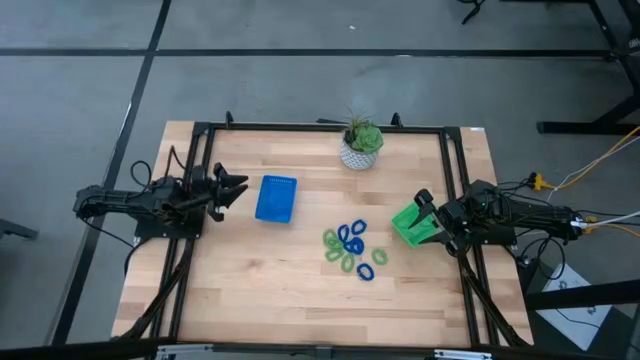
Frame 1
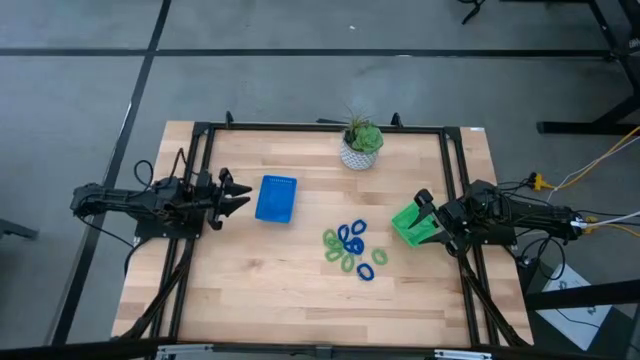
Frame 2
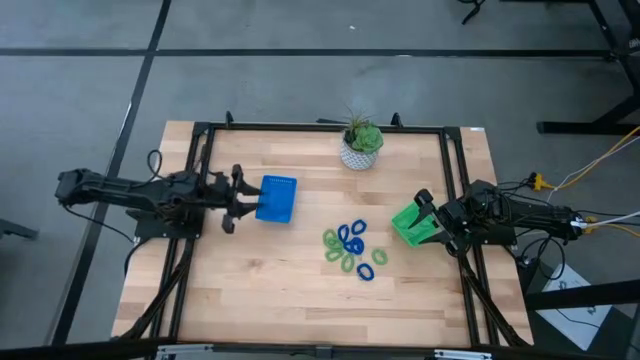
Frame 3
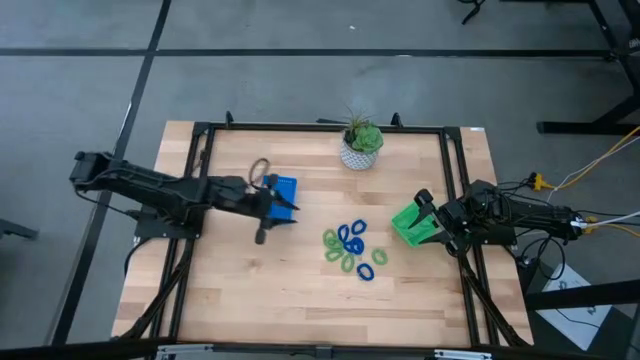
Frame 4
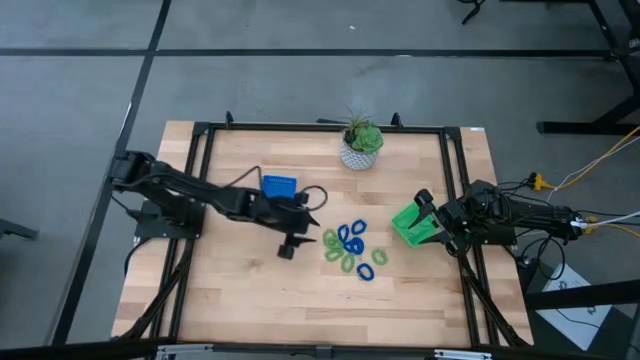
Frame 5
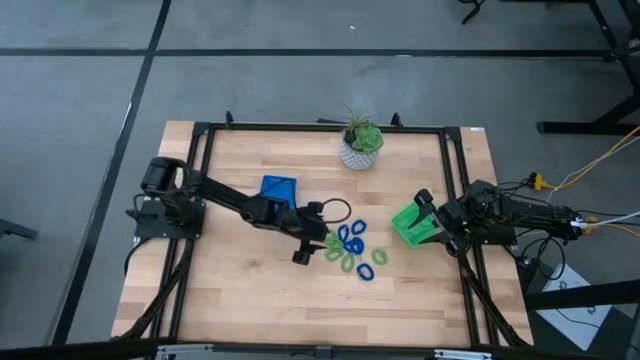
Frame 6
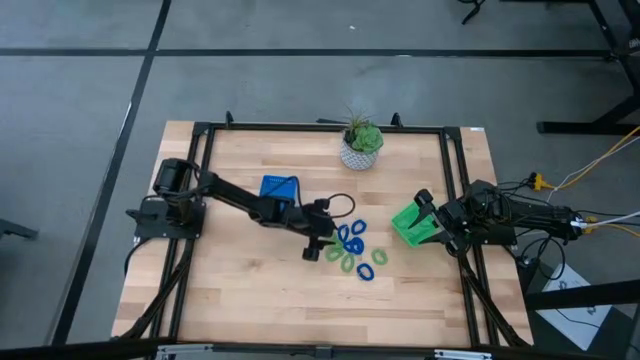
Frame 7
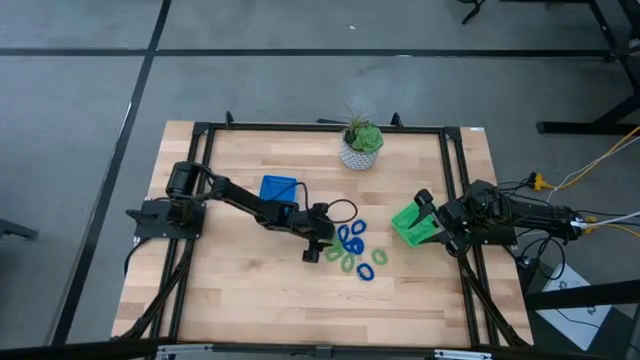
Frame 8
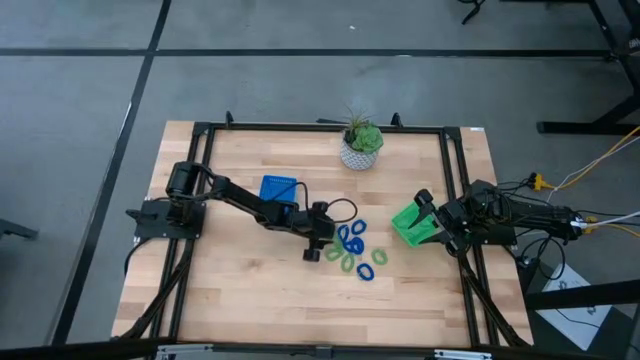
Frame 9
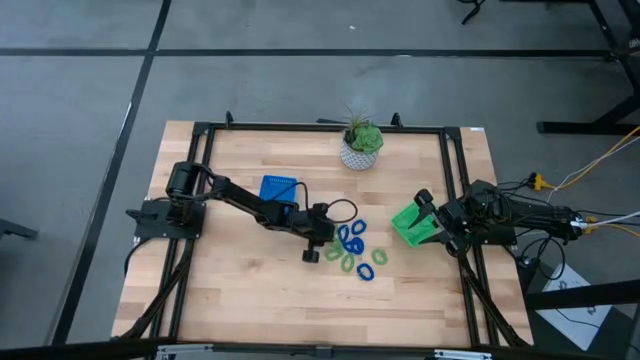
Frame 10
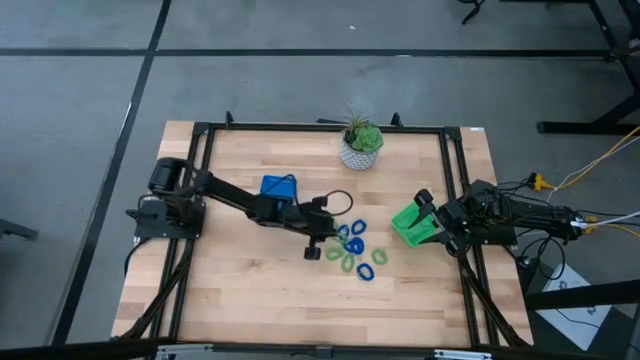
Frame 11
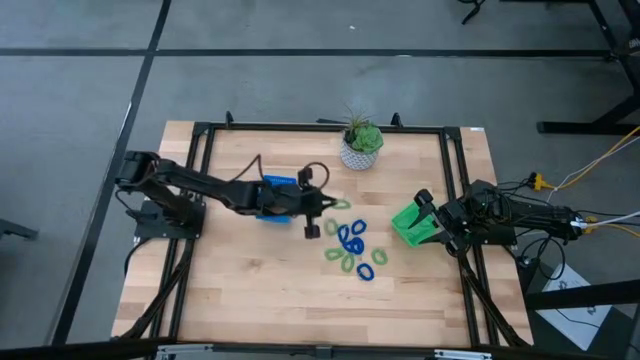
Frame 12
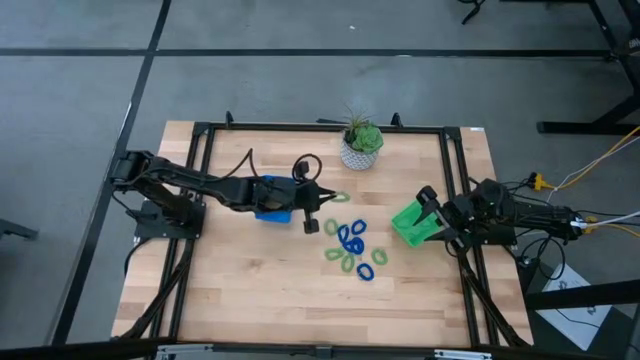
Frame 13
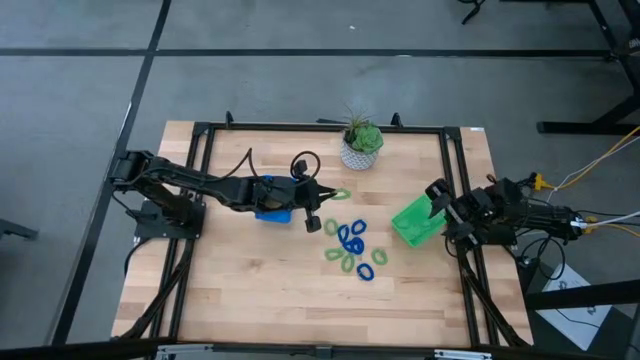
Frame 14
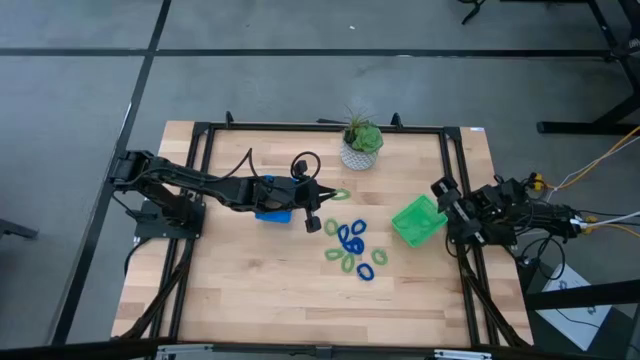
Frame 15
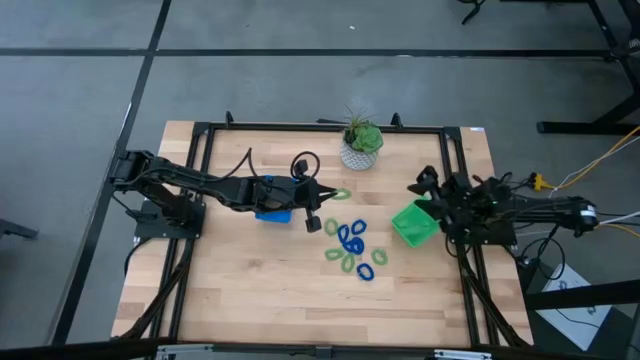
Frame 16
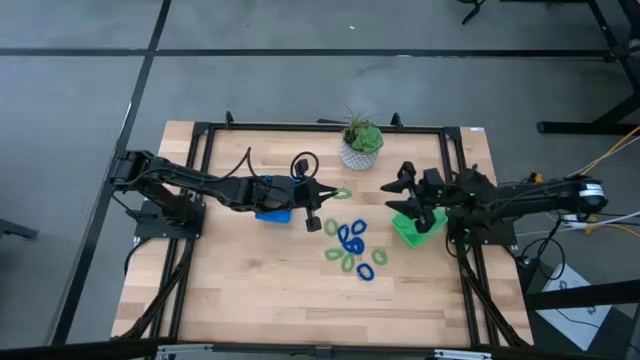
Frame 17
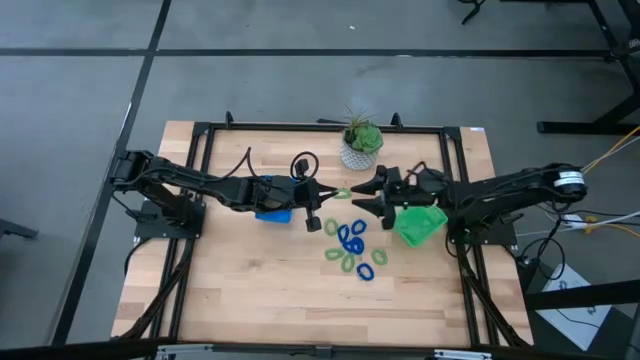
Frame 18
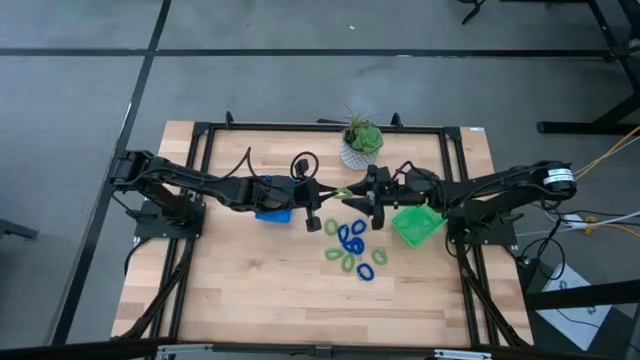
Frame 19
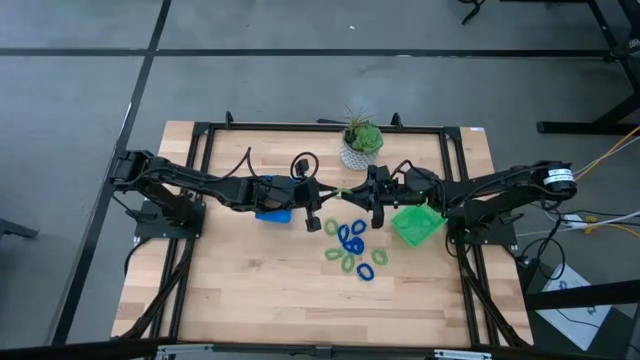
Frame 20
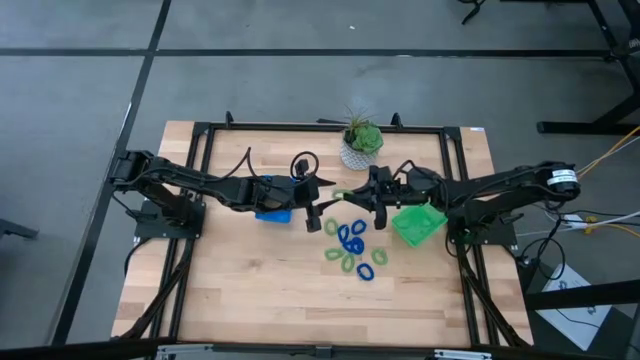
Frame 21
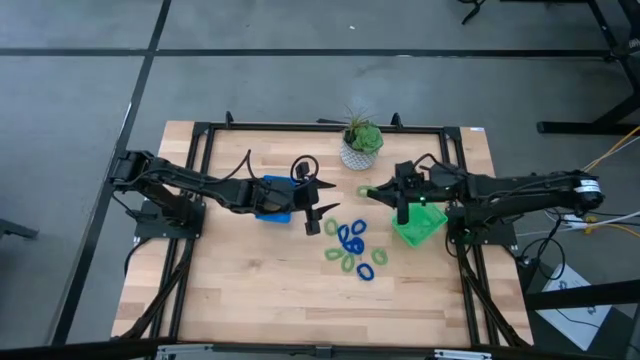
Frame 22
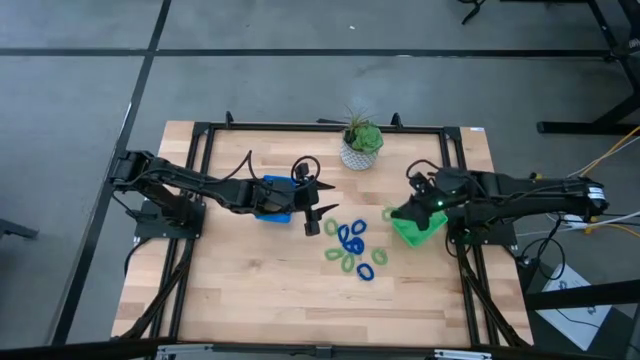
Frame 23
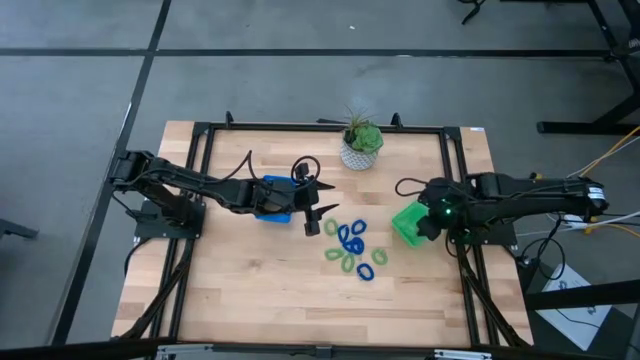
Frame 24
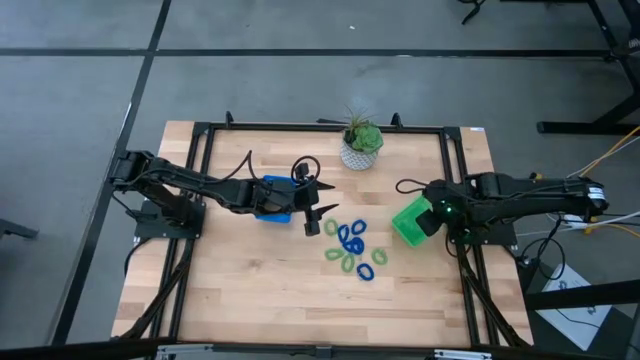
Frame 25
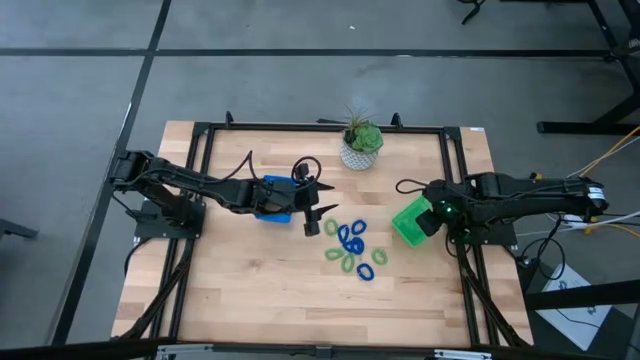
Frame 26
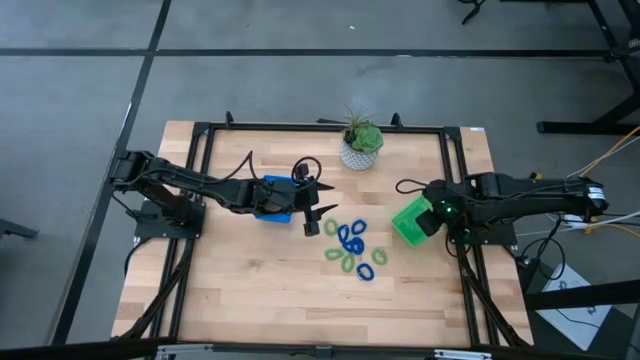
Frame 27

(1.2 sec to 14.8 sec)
Task: Sort items
Put the green spring keychain into the green bin

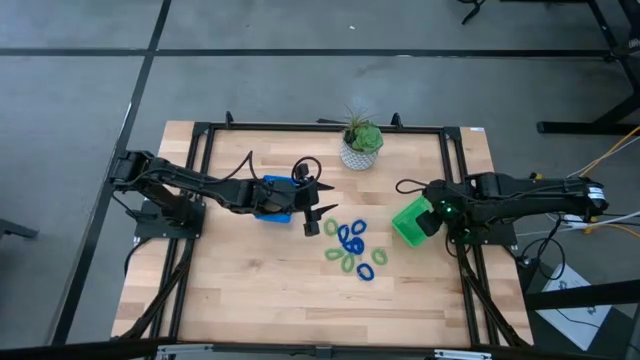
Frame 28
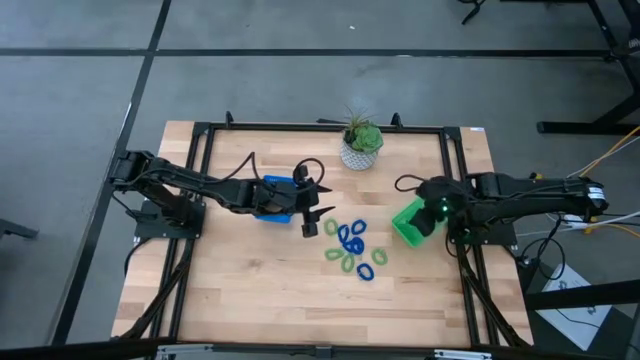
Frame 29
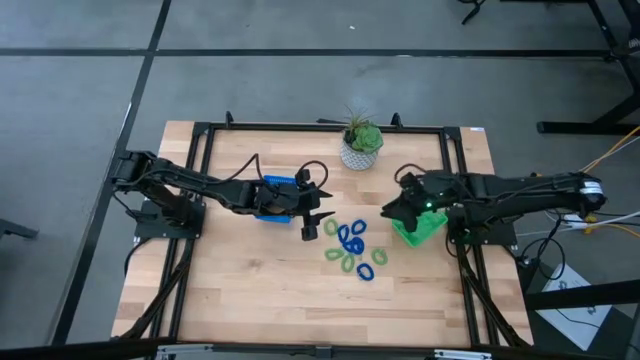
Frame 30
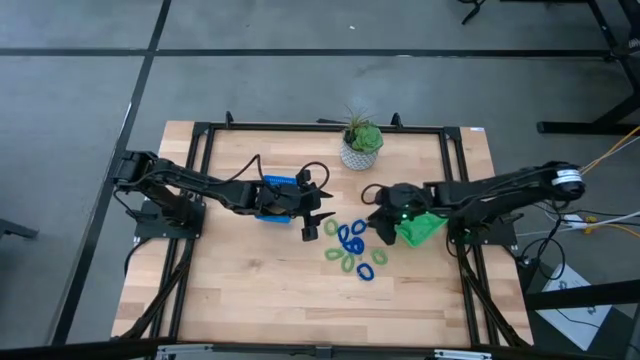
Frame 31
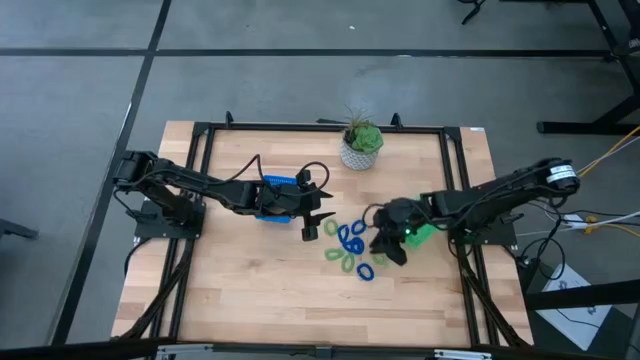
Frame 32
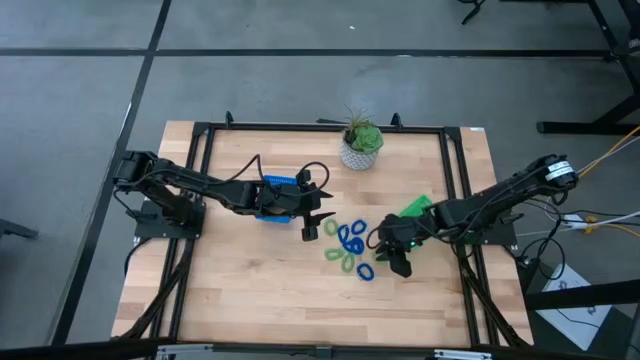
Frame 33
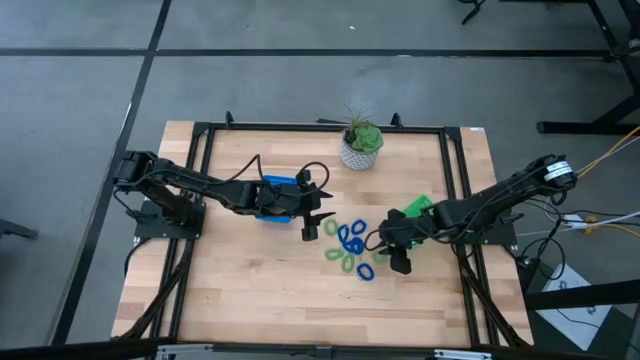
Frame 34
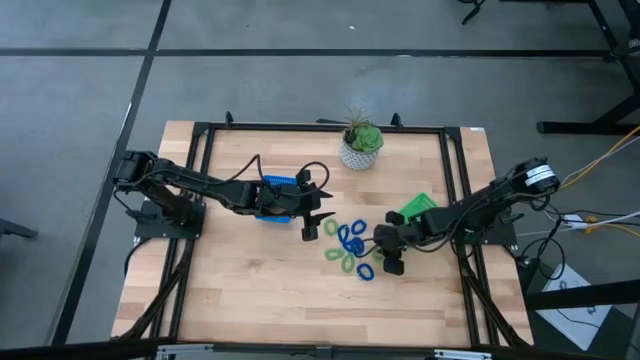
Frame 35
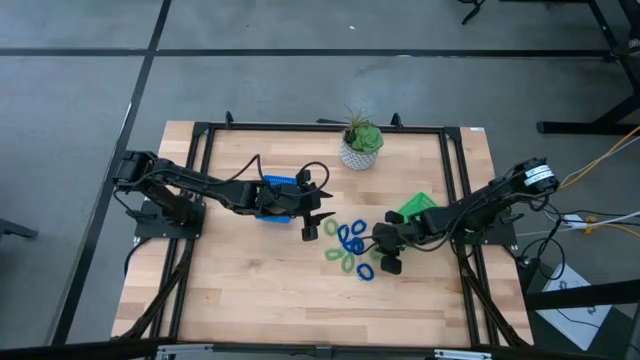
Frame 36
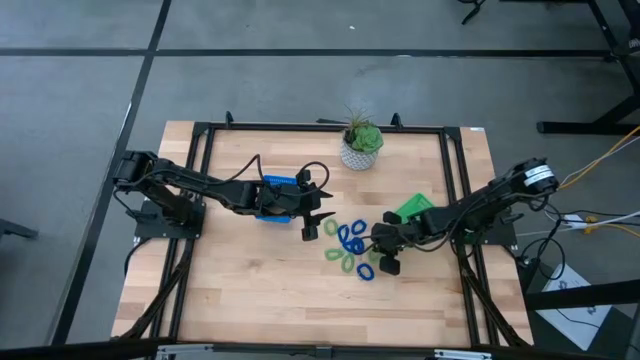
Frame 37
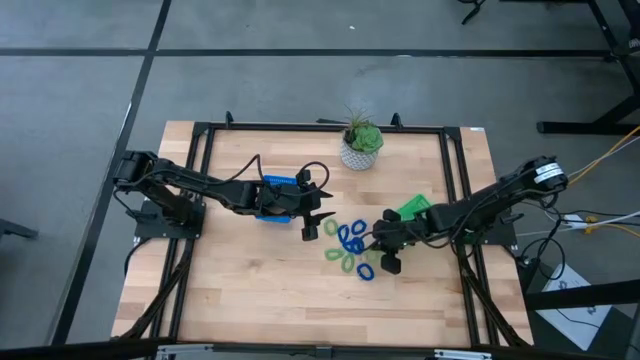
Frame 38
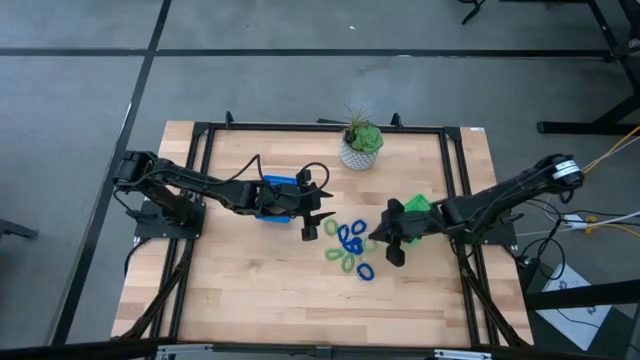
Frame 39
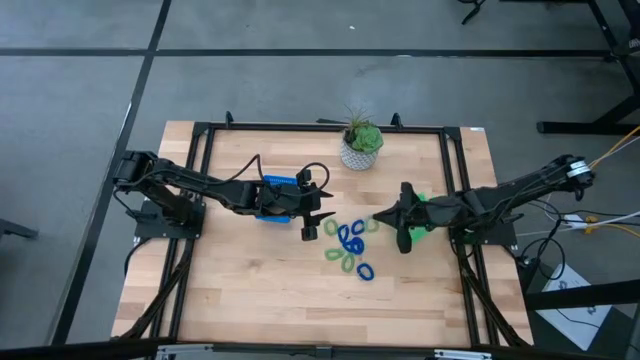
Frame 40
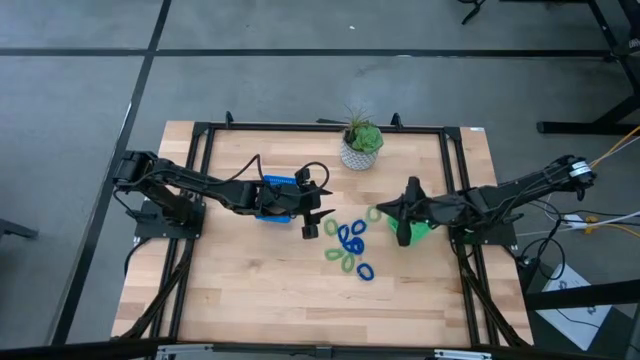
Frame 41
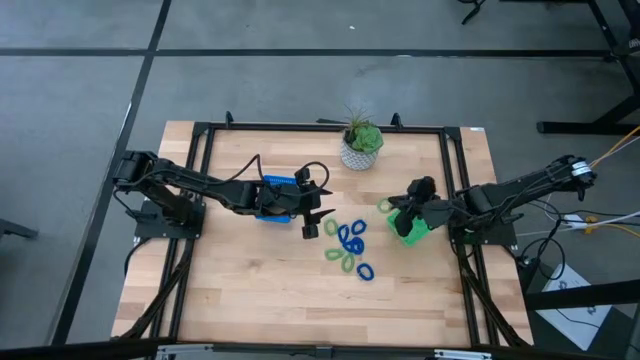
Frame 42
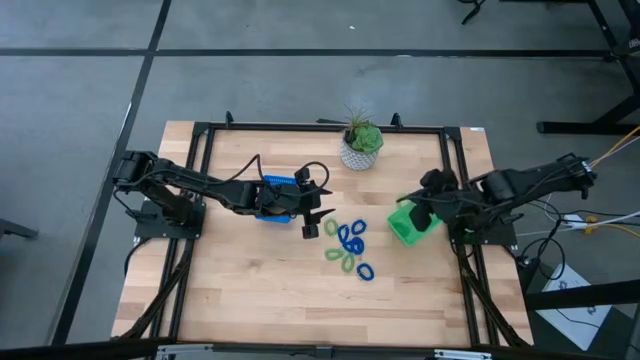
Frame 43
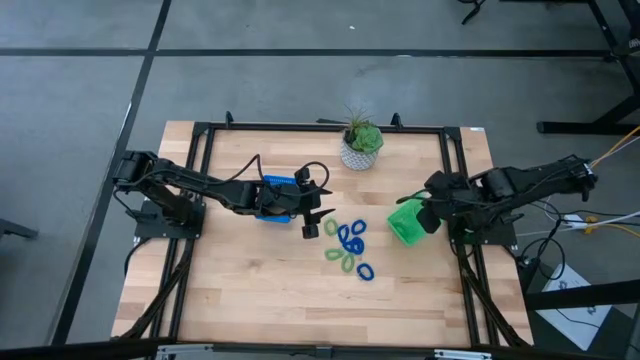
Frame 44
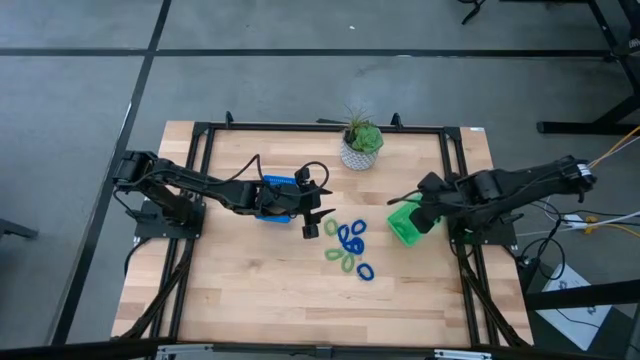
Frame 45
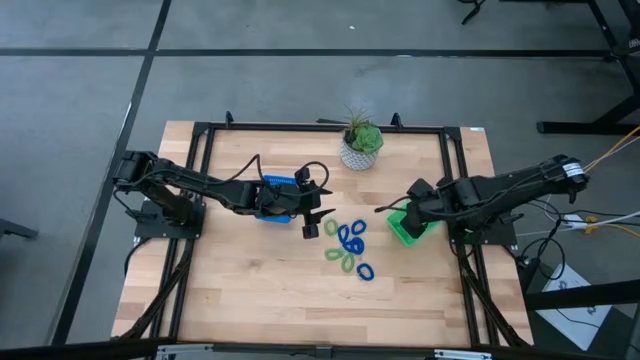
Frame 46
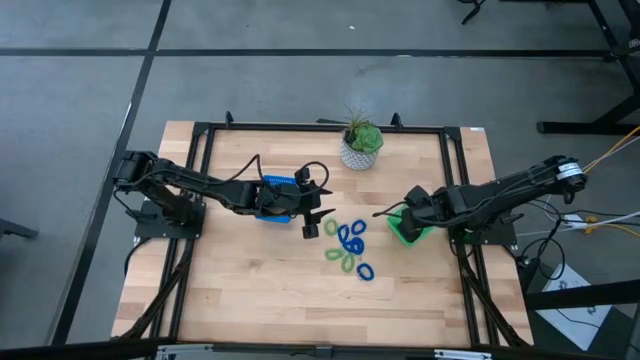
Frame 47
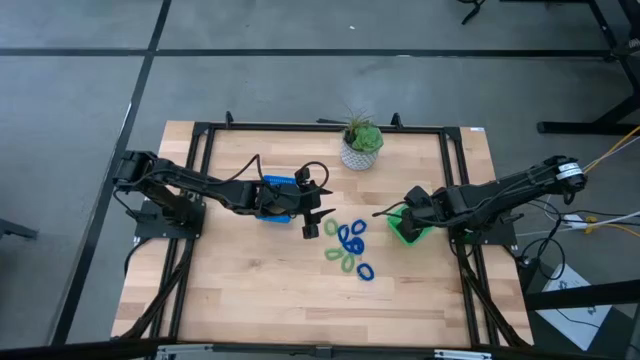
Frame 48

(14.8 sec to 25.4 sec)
Put the green spring keychain into the green bin
